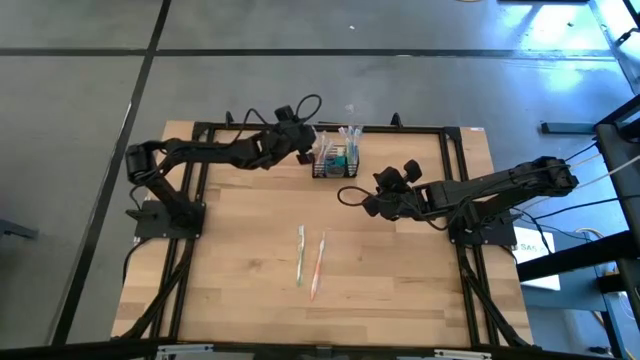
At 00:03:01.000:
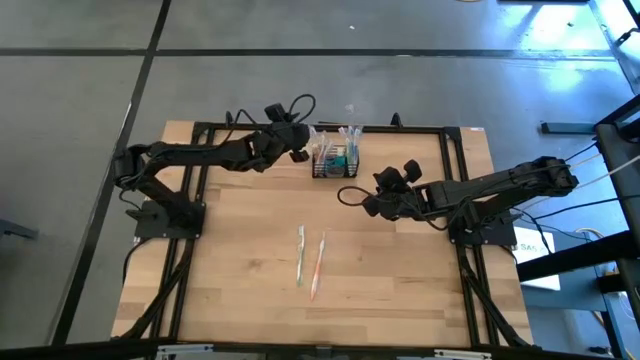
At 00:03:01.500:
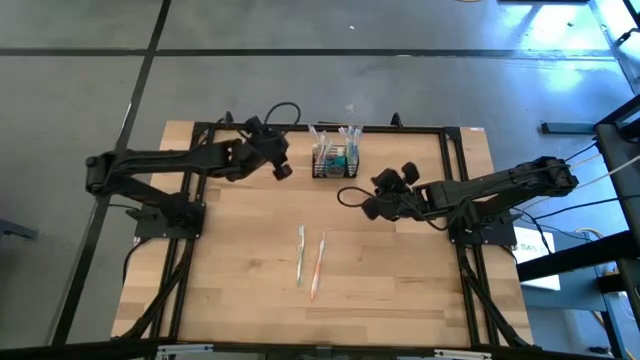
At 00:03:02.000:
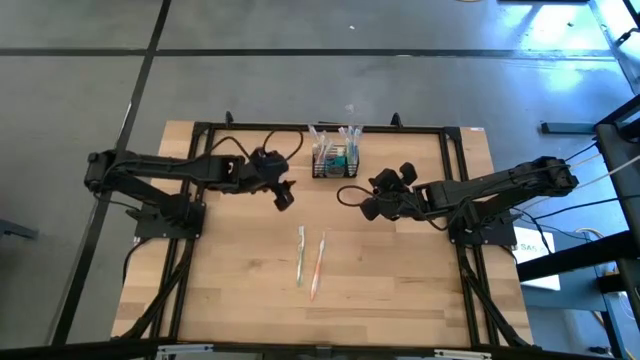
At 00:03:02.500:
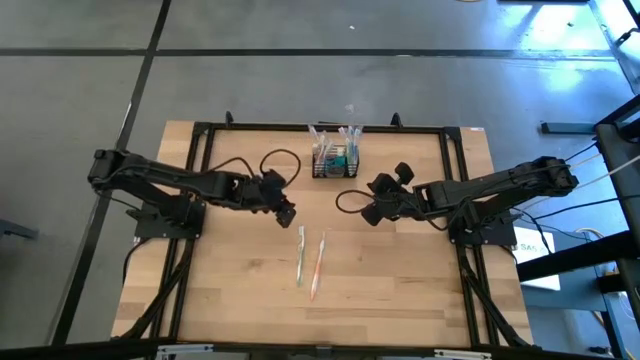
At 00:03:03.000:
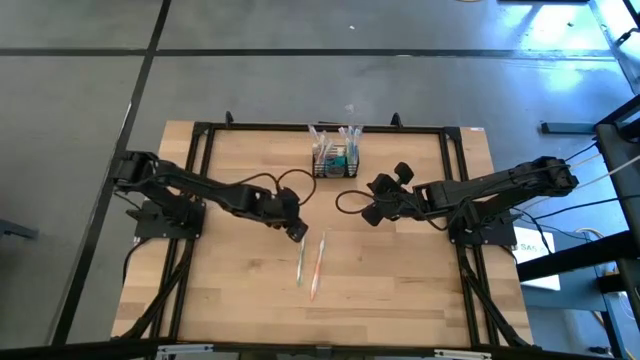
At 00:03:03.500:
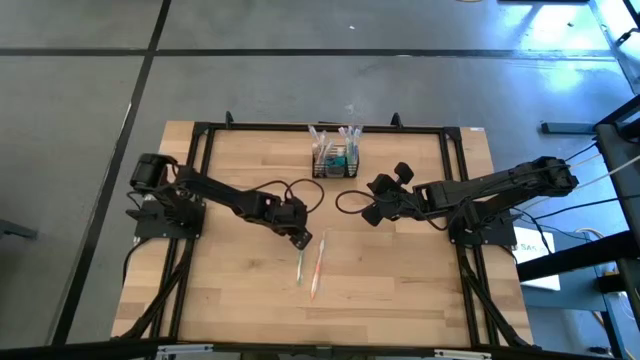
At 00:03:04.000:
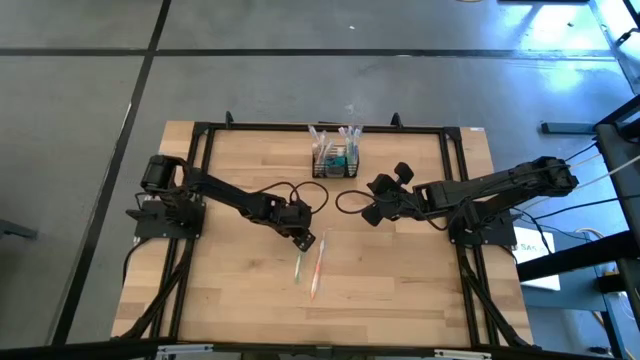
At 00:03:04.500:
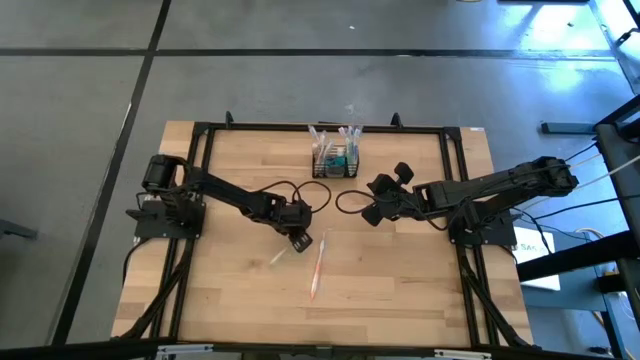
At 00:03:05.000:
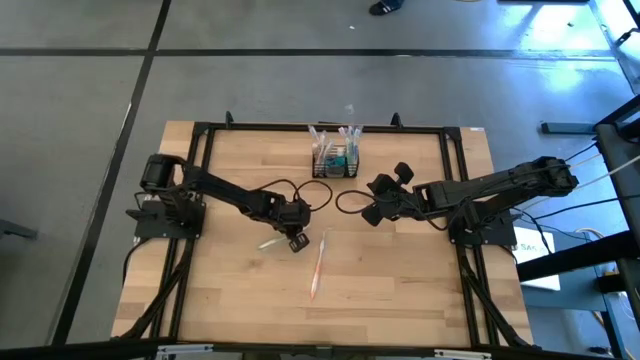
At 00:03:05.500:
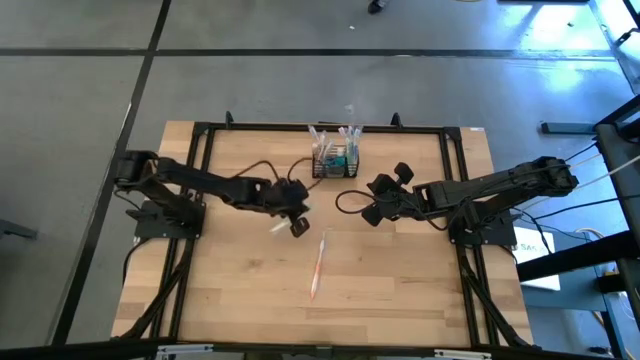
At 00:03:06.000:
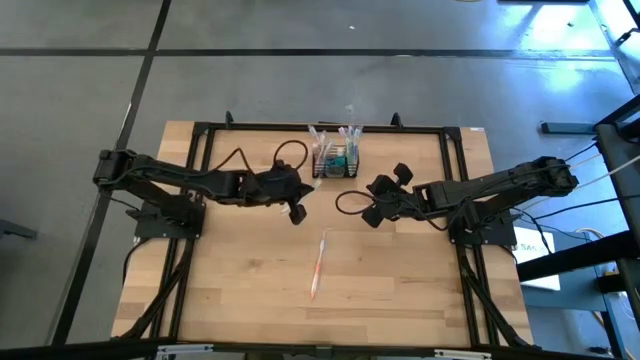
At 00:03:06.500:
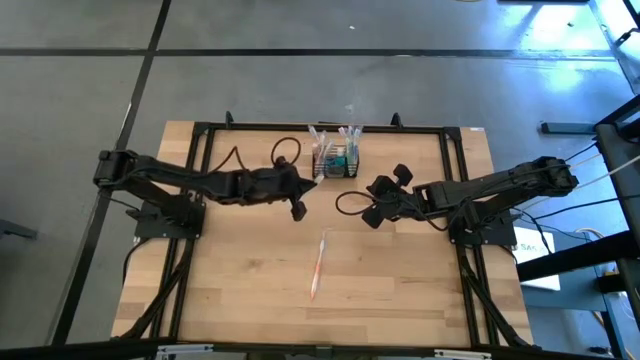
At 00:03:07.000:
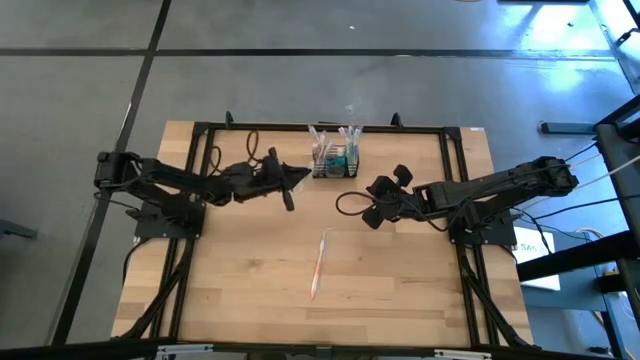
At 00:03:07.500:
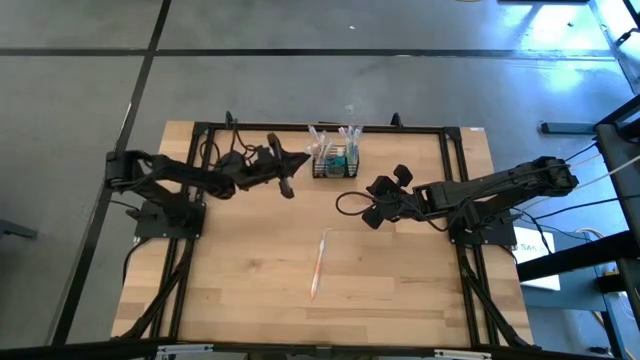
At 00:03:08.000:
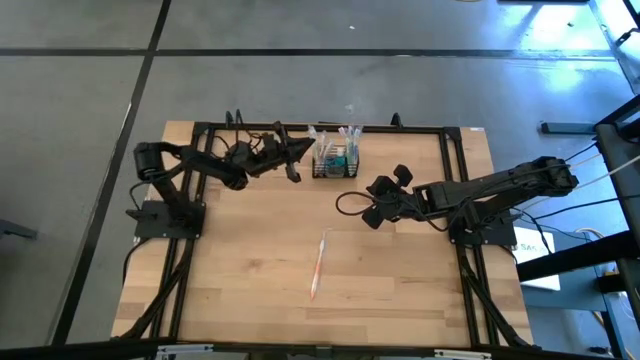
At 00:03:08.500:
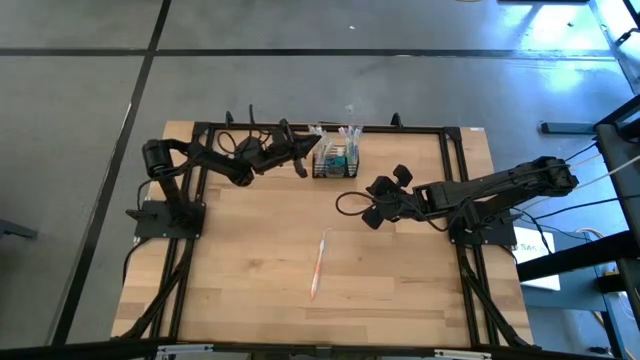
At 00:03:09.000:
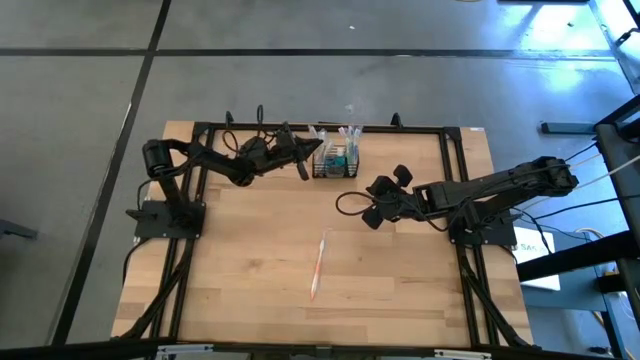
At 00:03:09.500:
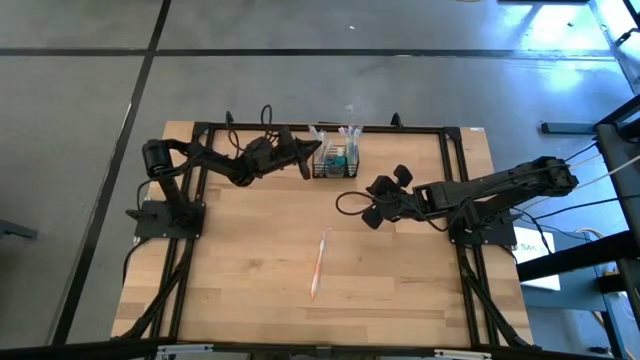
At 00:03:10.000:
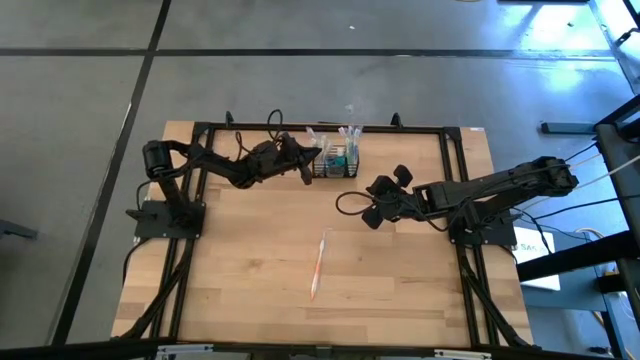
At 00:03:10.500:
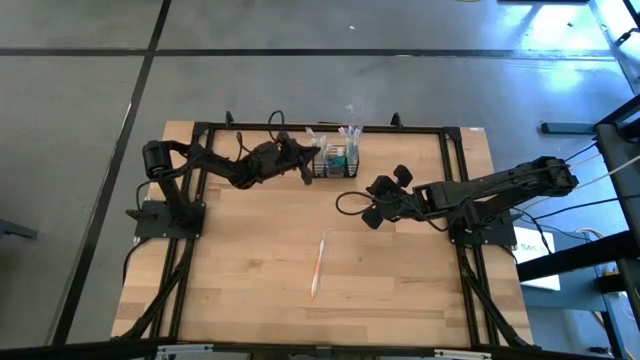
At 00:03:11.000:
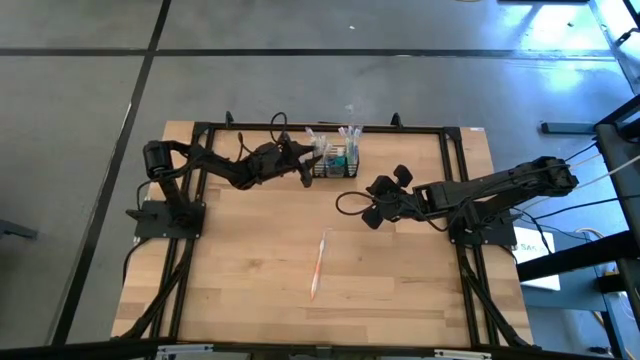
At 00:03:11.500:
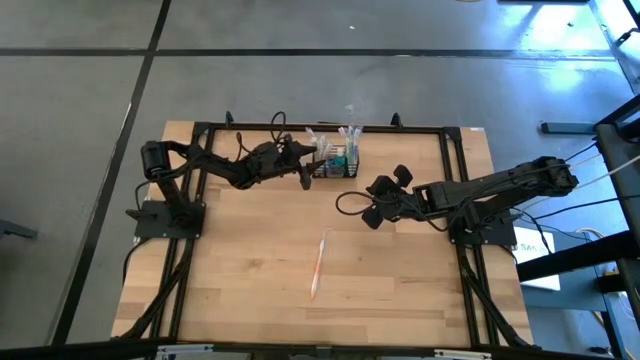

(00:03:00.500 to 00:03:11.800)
Task: Pick & Place toothbrushing station
Put the green toothbrush in the left section of the wire organizer

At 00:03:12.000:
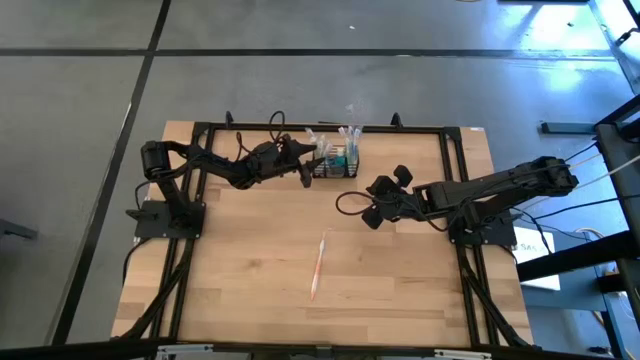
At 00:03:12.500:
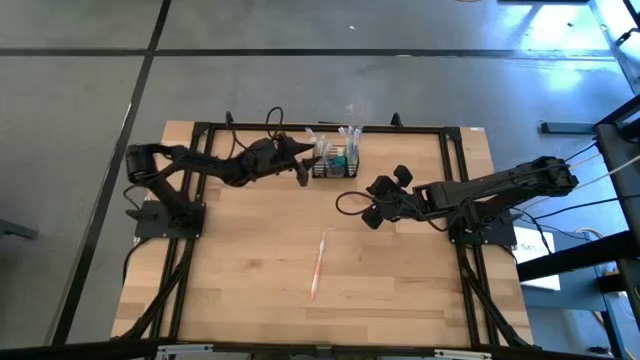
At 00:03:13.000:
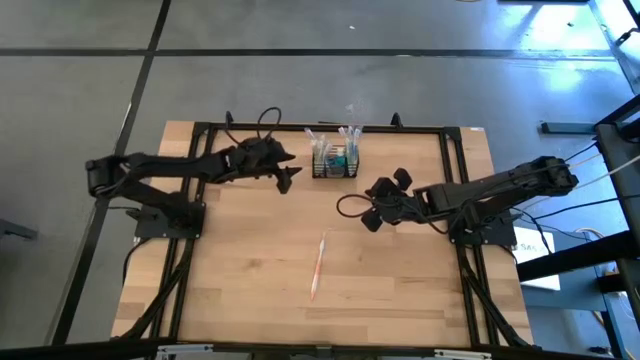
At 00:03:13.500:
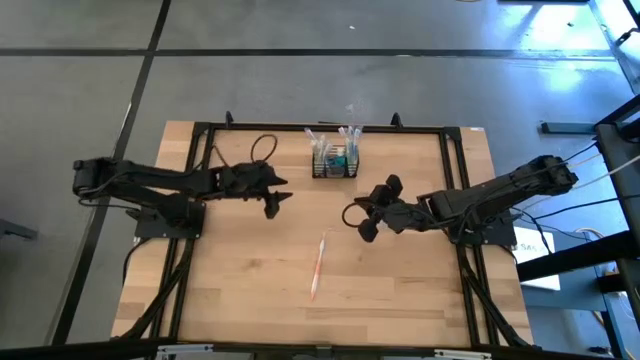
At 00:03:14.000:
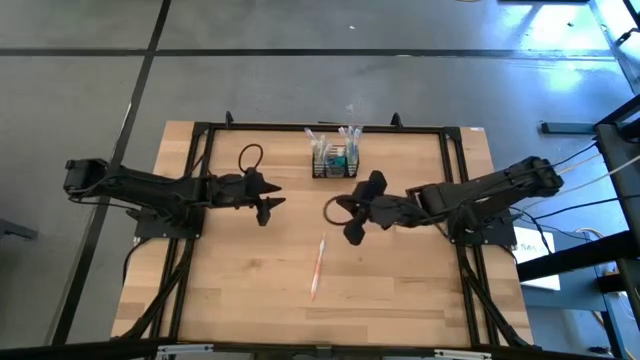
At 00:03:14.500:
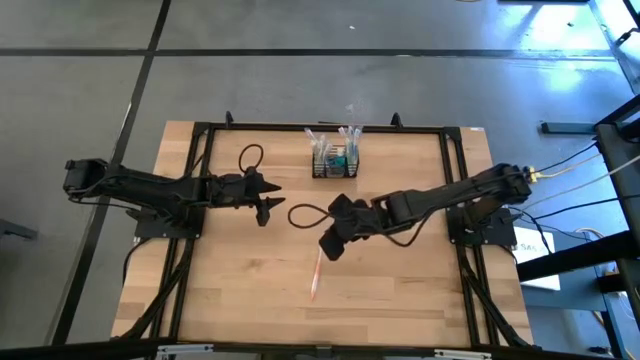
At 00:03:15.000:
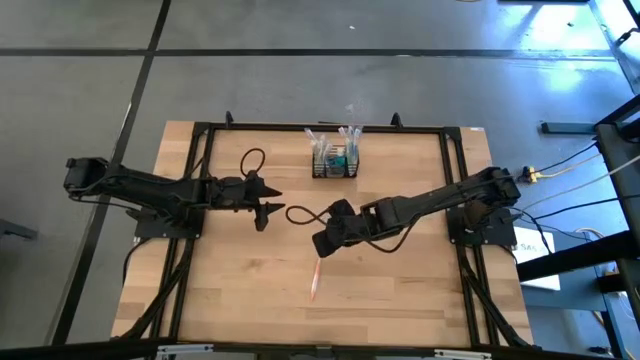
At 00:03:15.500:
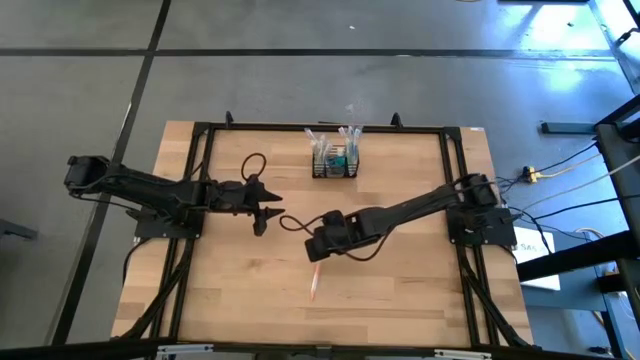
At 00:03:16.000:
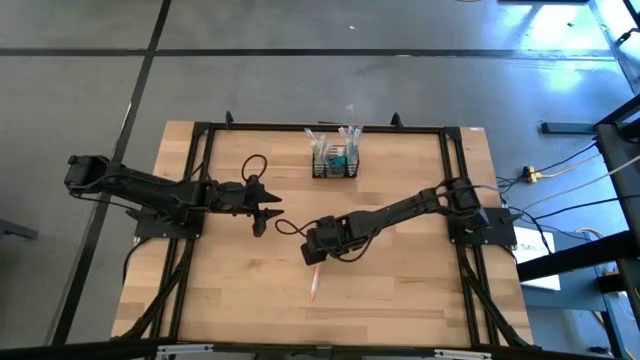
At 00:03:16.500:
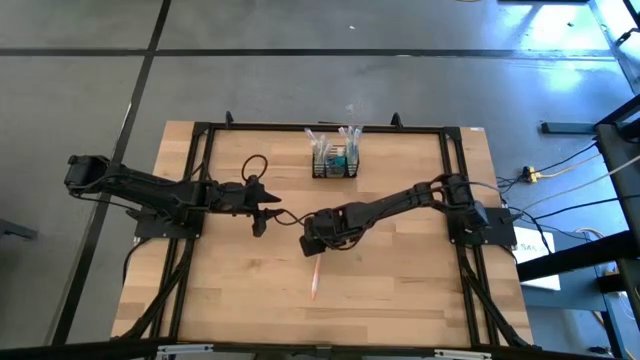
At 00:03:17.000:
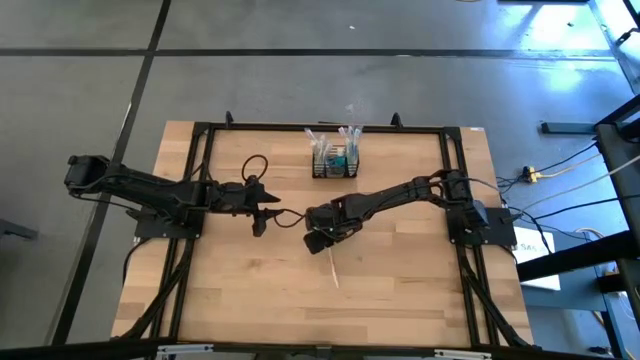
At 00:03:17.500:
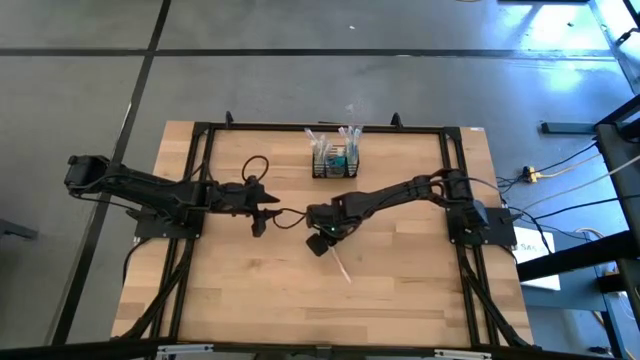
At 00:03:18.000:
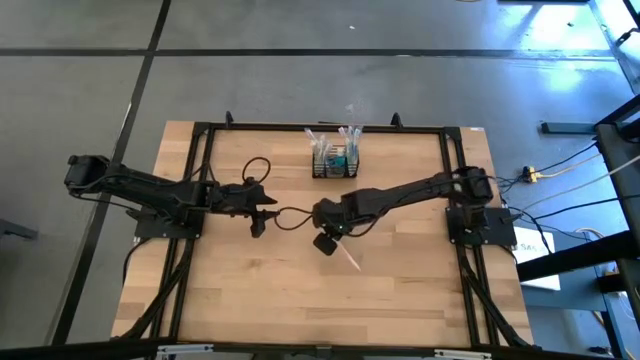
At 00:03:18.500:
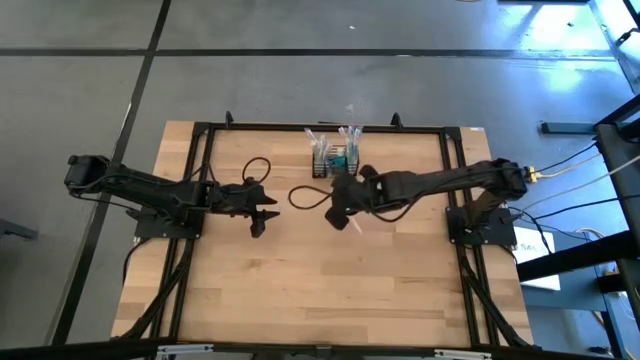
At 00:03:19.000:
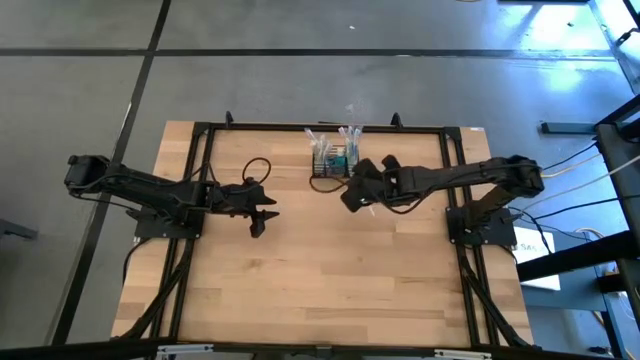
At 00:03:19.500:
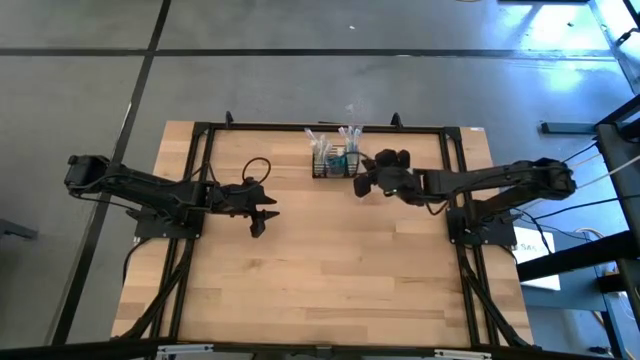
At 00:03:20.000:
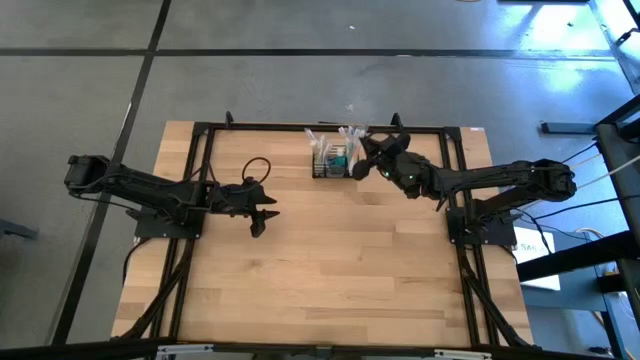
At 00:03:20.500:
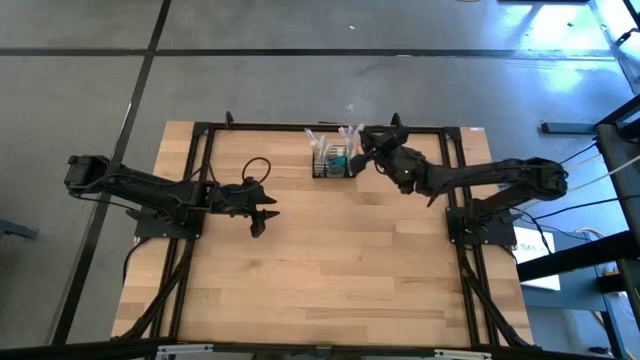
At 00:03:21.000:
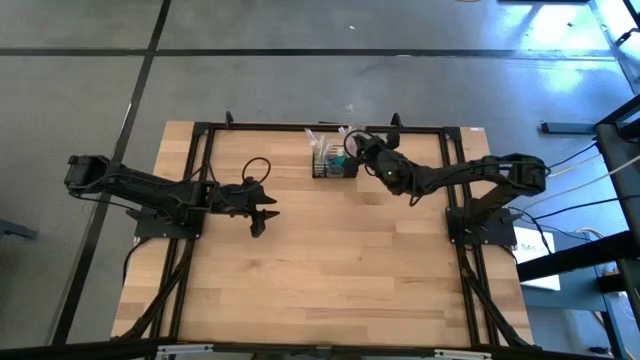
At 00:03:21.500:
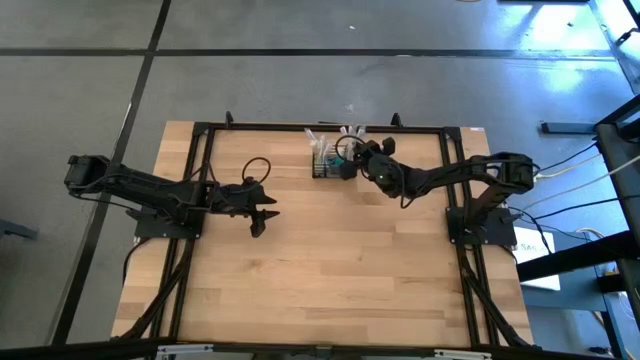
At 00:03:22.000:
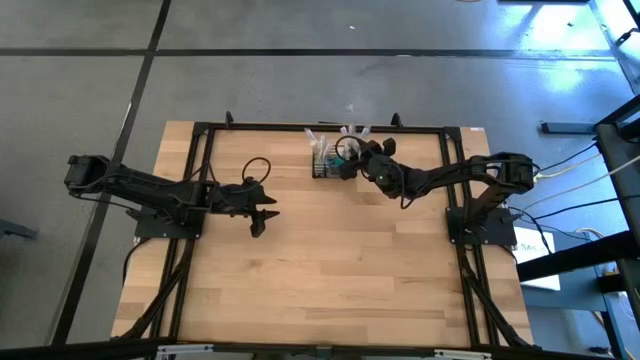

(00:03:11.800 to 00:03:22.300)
Put the orange toothbrush in the right section of the wire organizer
